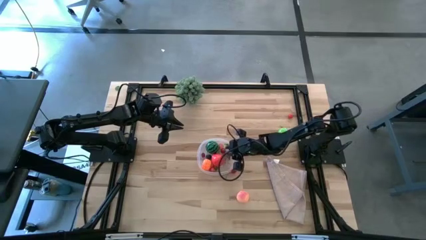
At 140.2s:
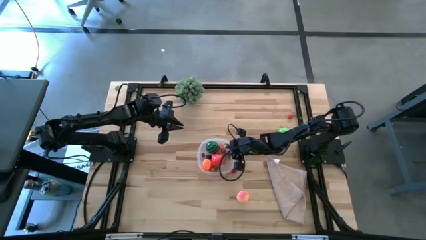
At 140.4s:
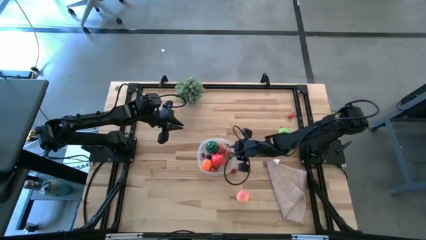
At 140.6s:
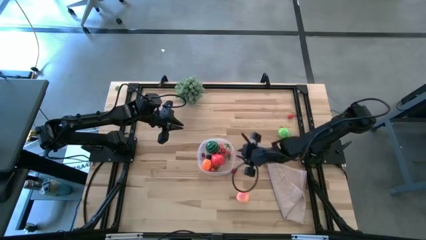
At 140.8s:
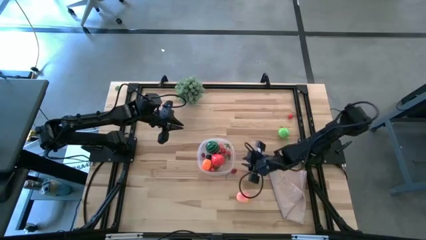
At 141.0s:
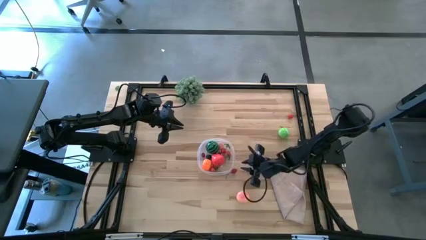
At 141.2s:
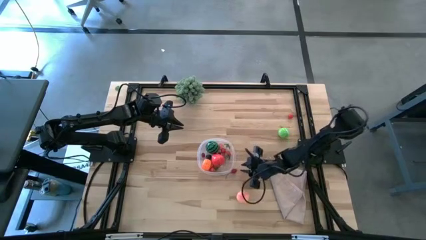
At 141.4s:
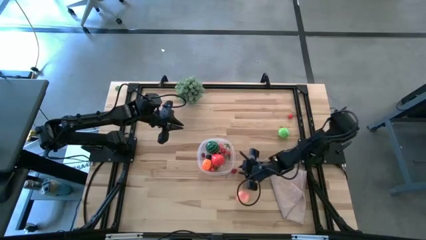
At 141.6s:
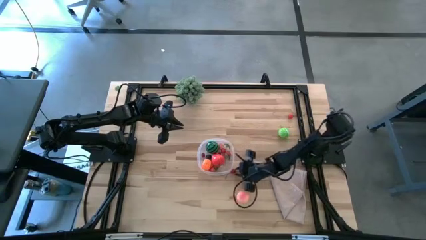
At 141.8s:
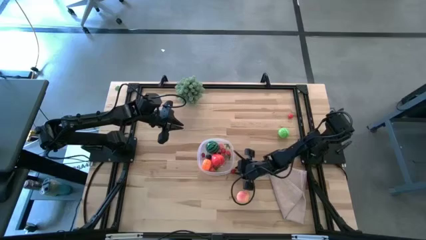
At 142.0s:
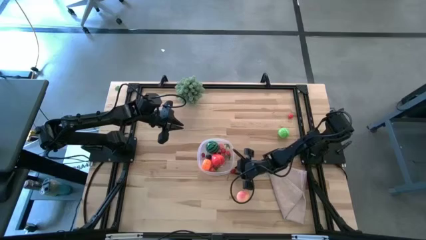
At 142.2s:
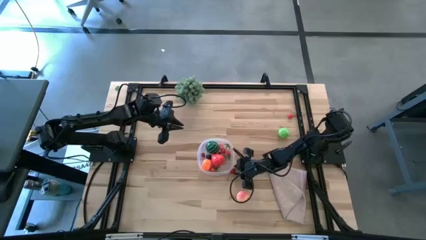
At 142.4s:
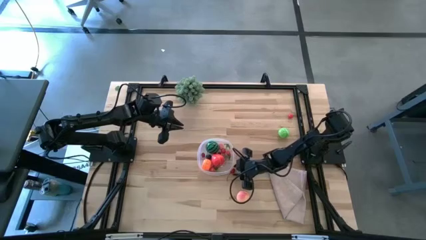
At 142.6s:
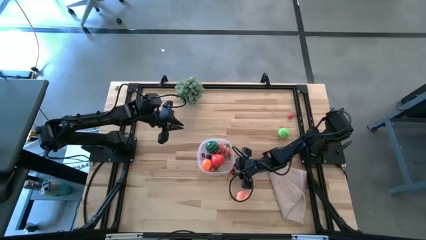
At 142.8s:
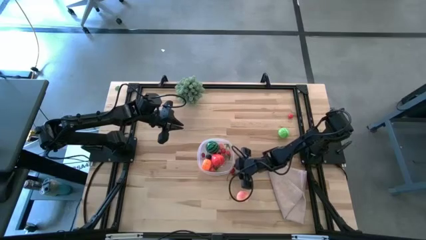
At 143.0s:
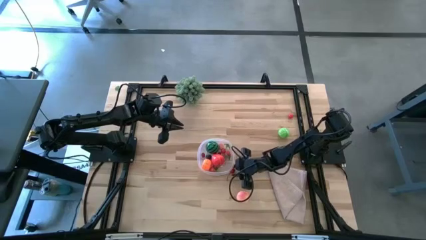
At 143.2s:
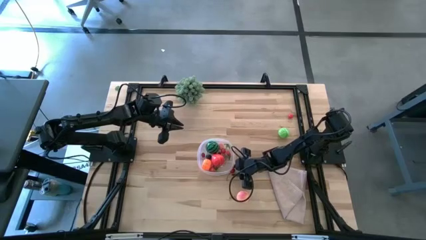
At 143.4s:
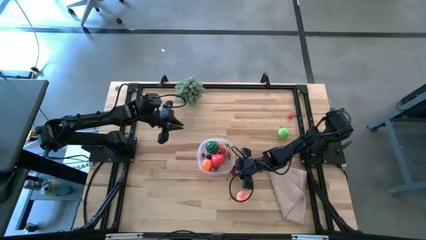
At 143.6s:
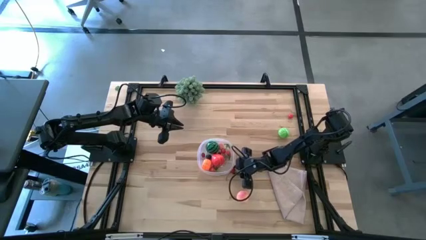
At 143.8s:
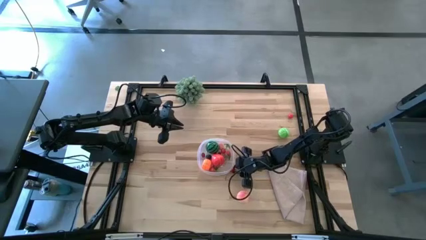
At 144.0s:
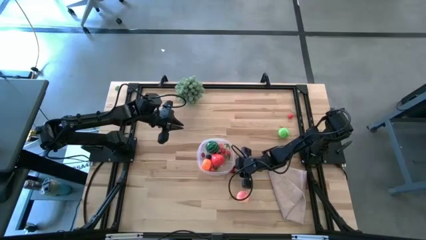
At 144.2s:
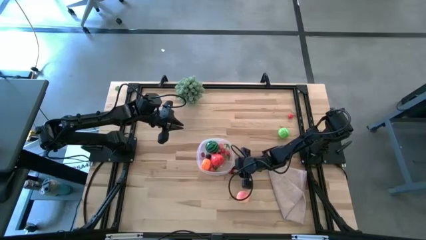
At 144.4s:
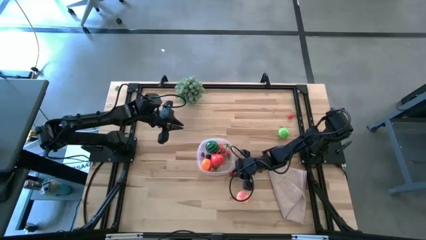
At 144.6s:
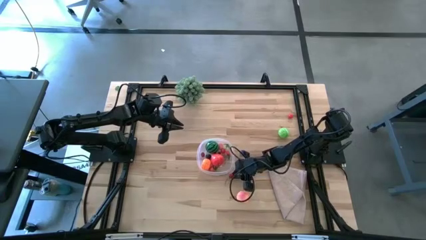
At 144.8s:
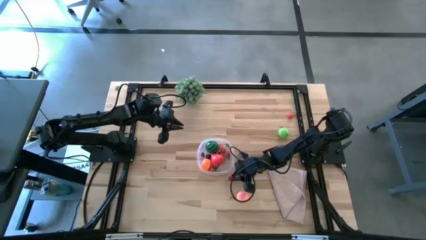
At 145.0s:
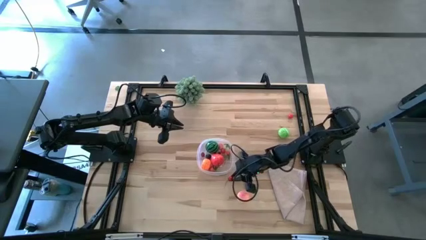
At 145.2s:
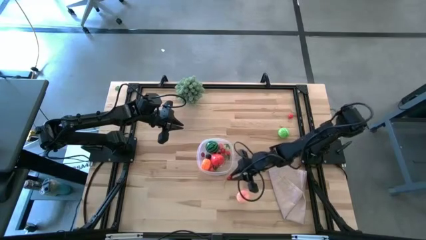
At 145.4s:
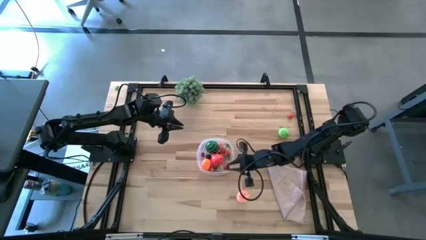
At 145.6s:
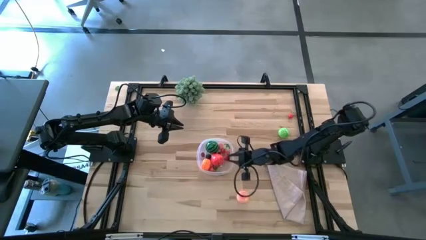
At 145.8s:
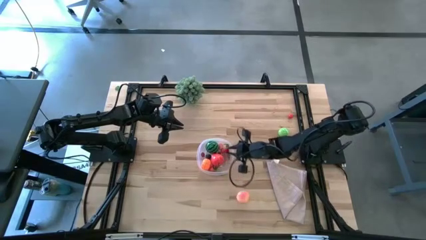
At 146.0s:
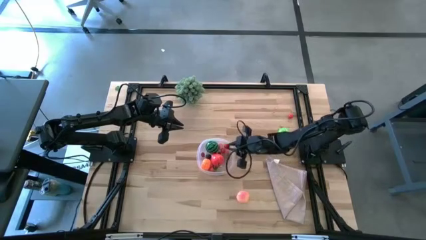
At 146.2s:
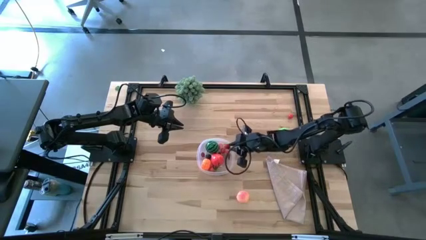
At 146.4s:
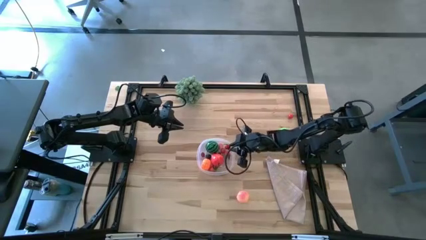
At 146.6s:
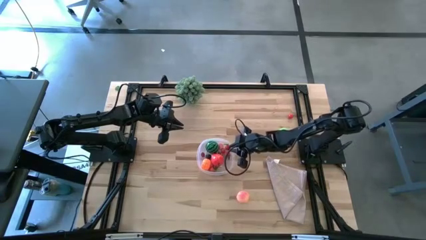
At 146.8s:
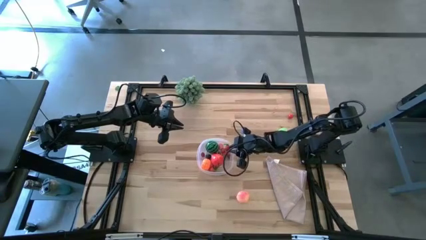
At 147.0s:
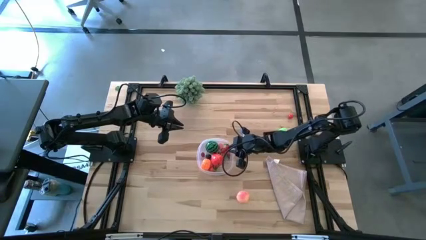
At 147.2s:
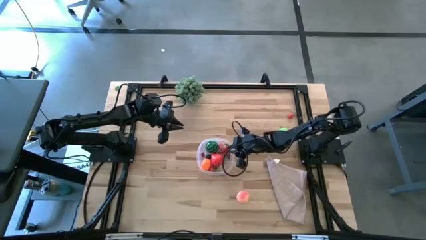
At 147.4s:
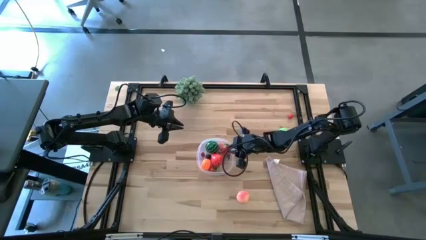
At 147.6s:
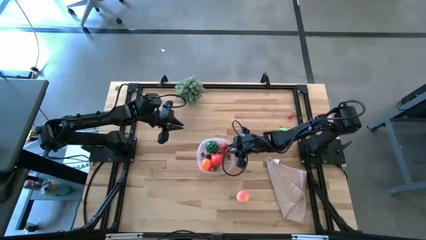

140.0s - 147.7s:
Task: Pick and placing Produce into tupperware
Put the bottom cherry into the transparent container

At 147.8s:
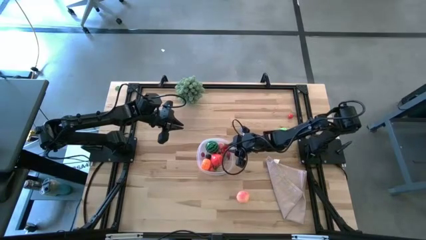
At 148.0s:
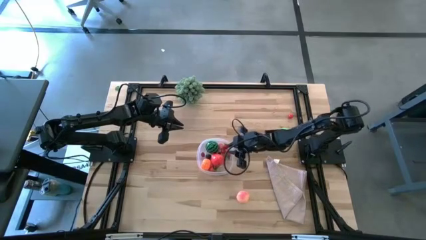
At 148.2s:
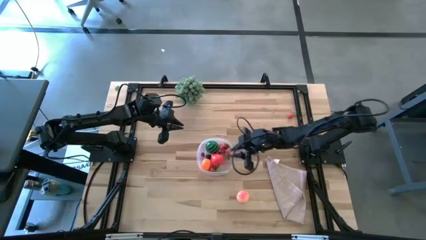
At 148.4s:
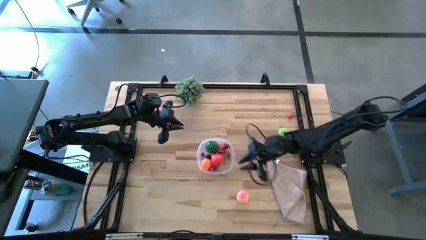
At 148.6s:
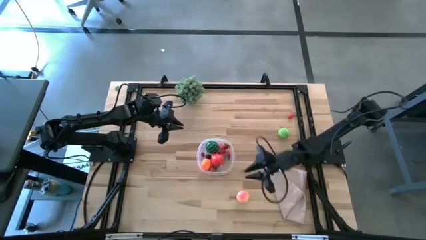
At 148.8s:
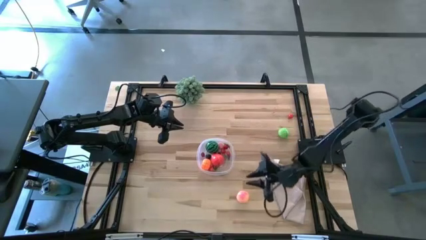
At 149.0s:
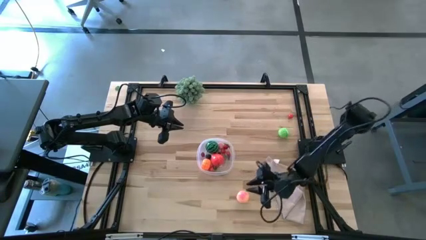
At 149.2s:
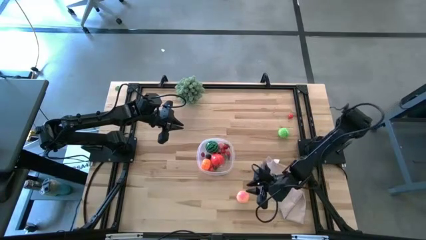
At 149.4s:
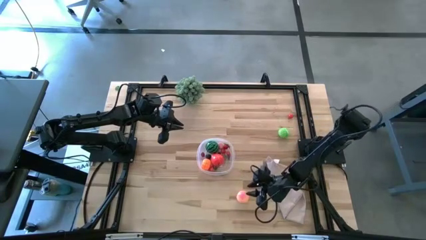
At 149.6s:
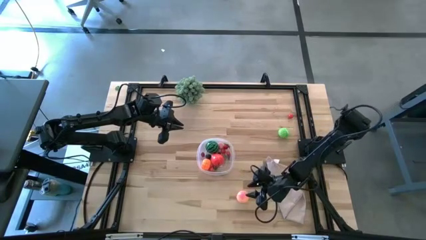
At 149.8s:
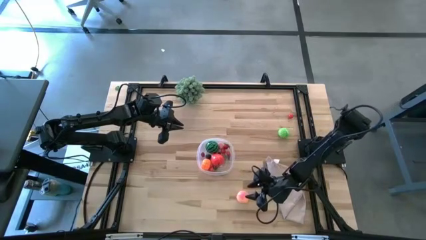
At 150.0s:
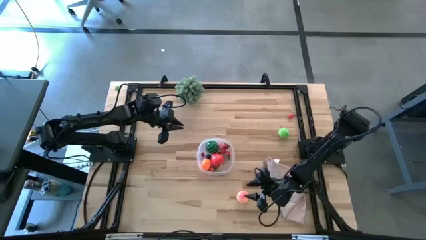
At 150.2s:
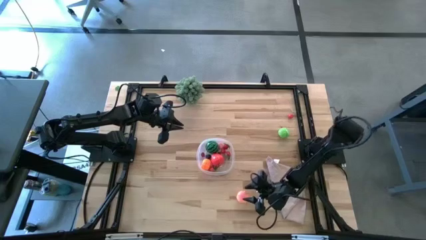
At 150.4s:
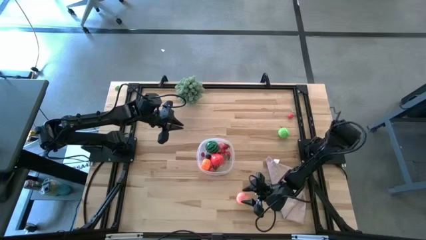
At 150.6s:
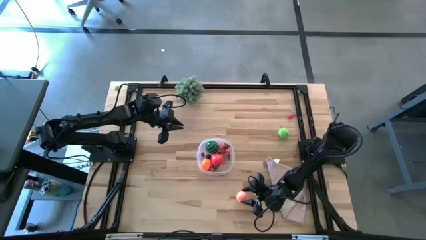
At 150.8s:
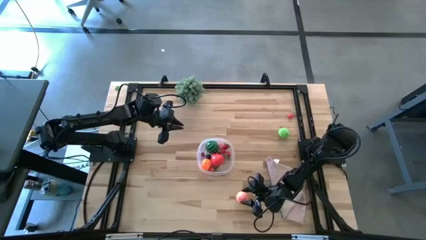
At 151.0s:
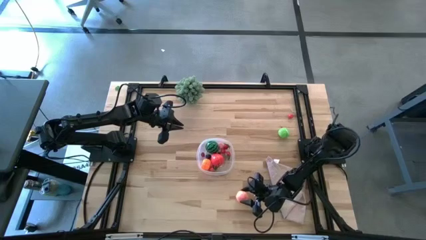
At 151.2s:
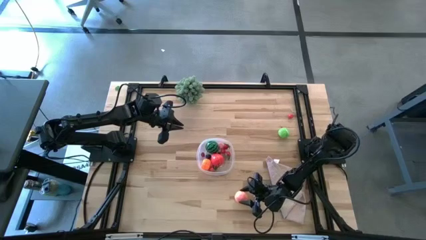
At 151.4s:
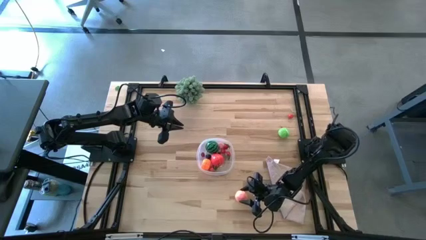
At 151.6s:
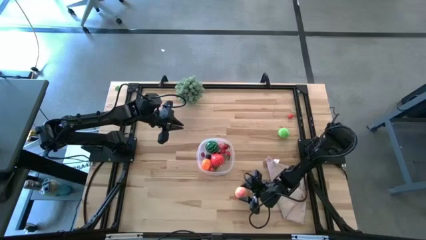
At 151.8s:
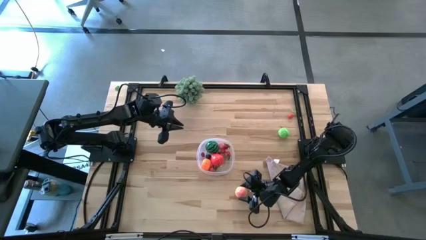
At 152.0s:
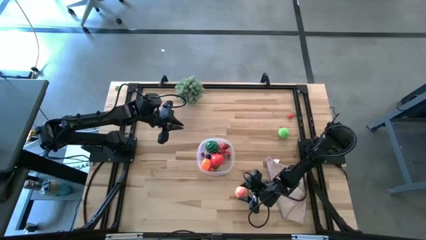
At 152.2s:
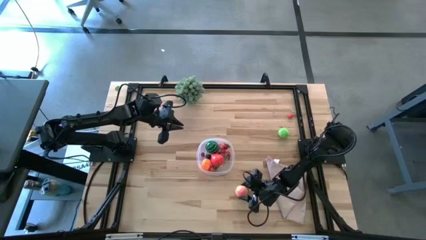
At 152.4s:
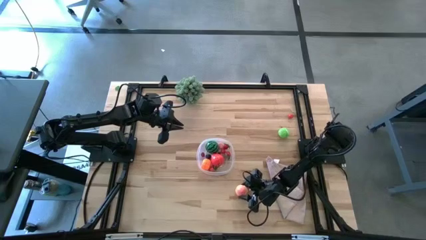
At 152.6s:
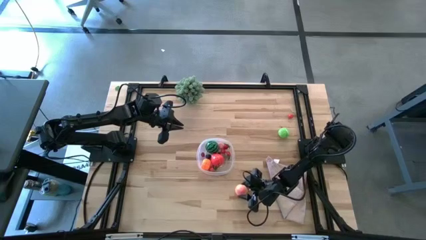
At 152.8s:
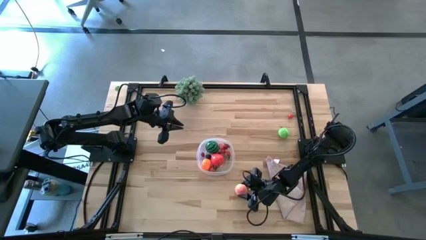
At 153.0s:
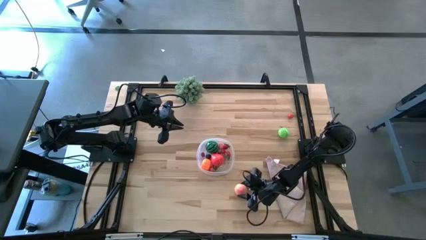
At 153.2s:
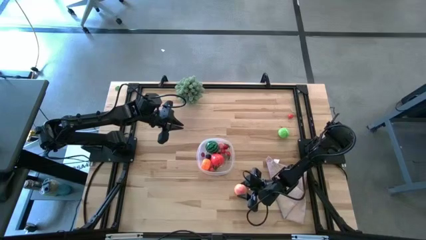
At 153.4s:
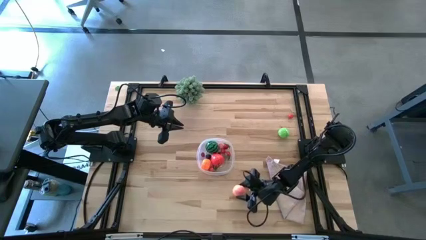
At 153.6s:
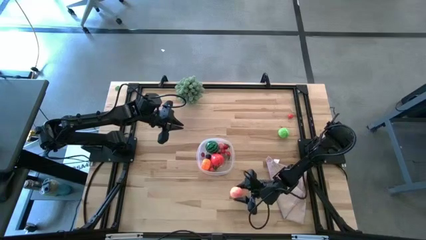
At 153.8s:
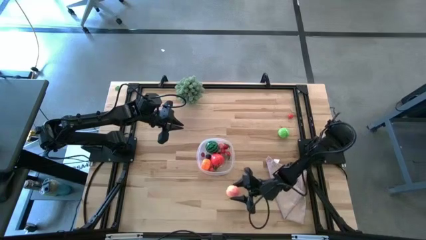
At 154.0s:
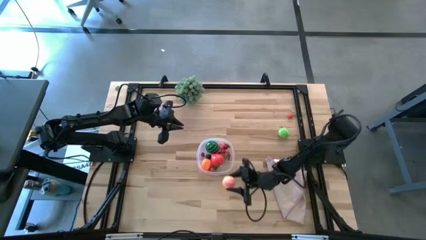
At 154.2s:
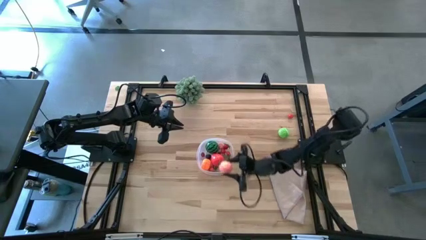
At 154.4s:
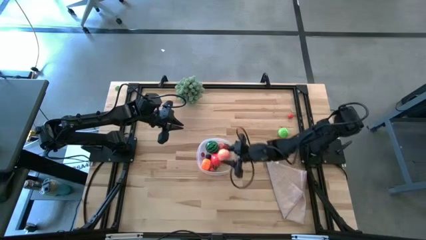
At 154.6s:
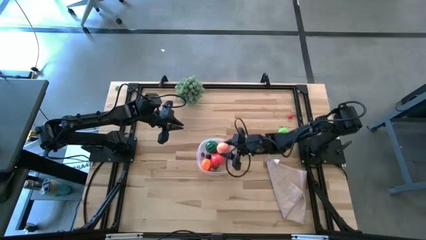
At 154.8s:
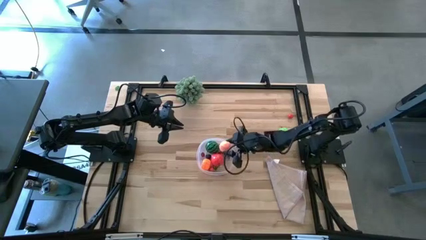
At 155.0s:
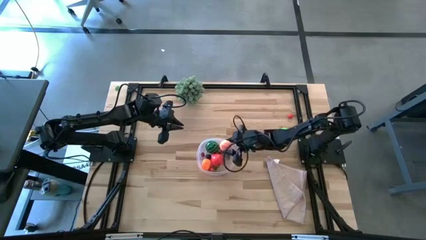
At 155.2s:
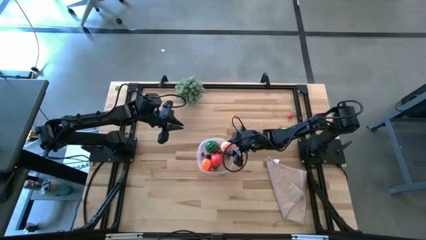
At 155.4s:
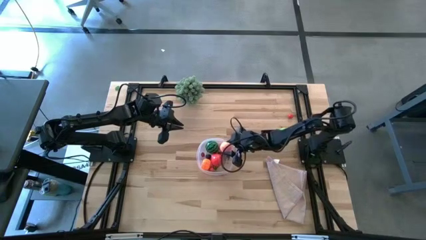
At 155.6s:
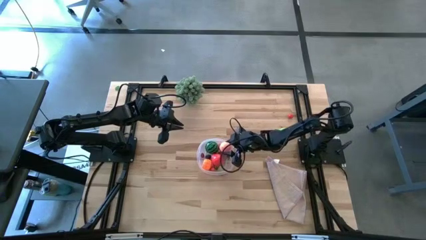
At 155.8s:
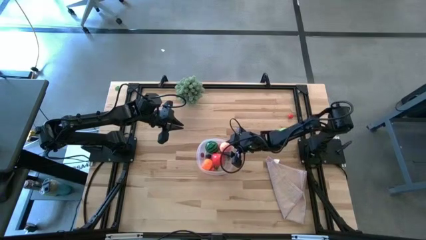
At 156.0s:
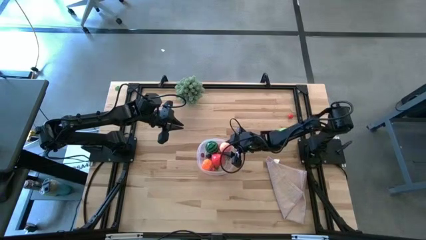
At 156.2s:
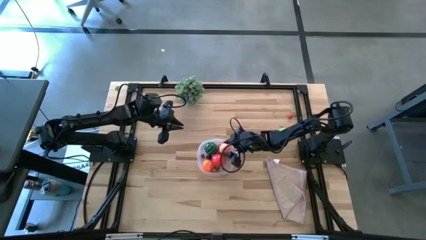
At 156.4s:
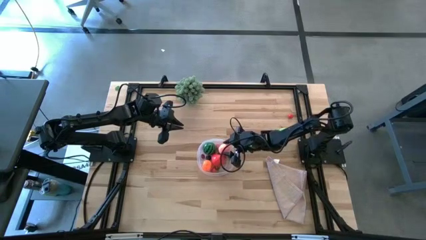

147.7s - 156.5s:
Put the peach into the transparent container

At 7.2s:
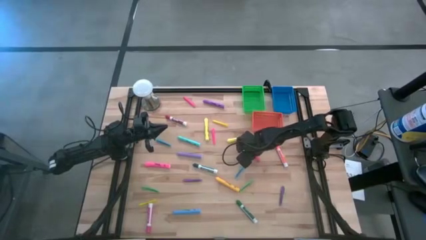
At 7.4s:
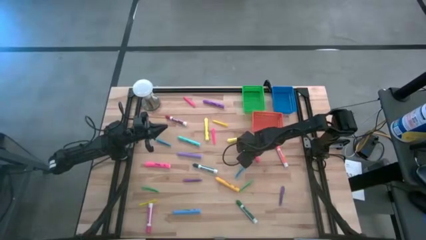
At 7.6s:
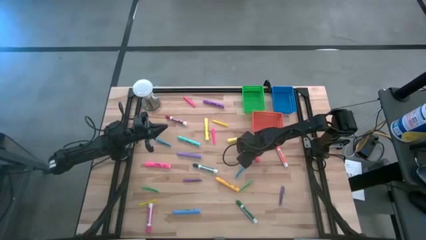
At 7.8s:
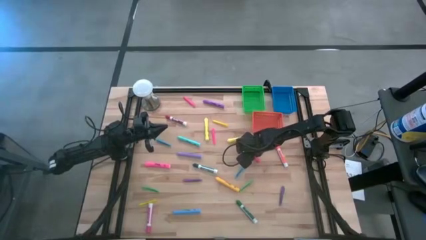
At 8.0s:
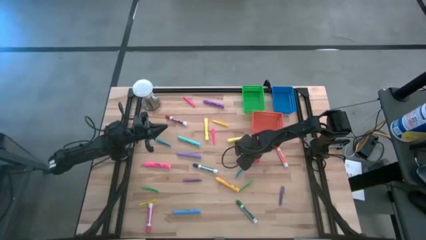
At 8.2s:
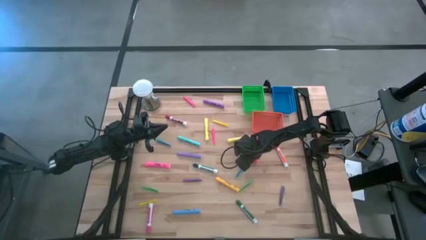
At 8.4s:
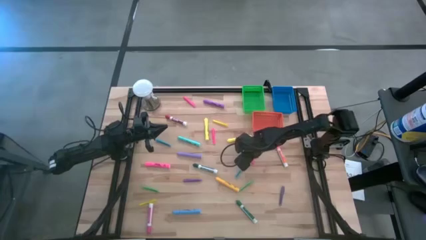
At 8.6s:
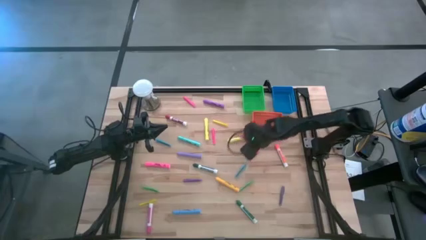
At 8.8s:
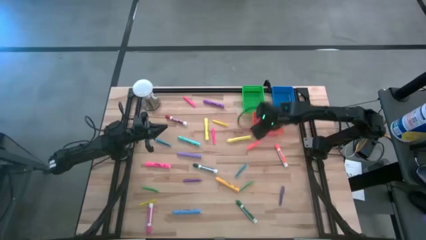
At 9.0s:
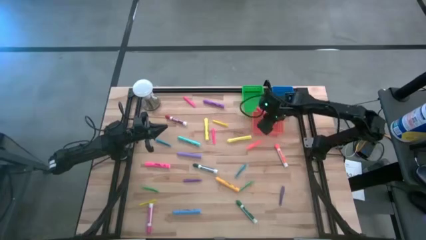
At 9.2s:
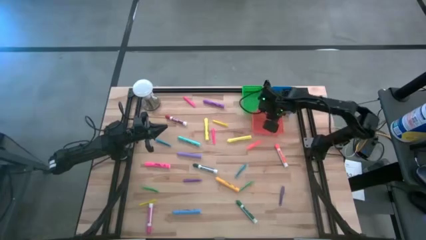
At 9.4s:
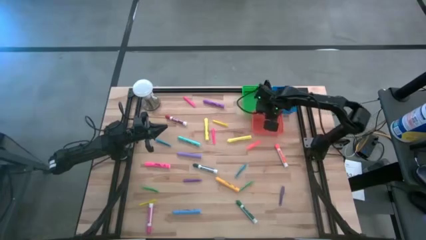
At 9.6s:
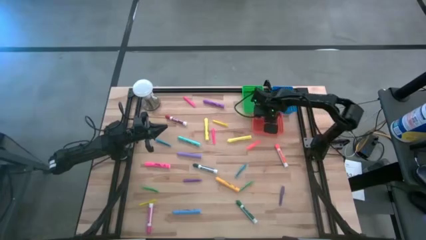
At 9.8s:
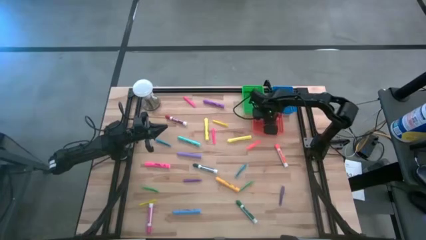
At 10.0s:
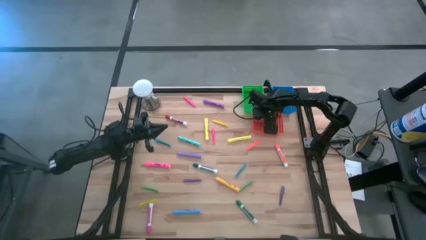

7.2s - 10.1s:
Task: Pick & Place Markers
Put the right pink highlighter pen into the orange bin
